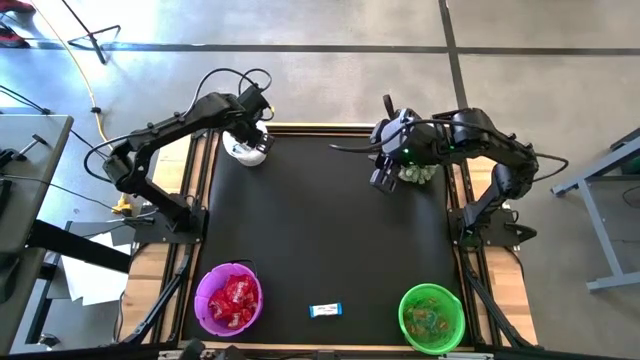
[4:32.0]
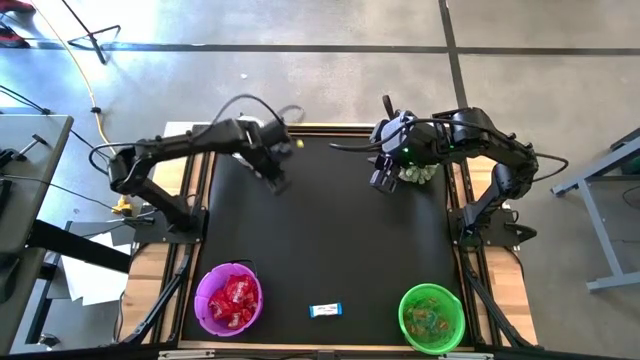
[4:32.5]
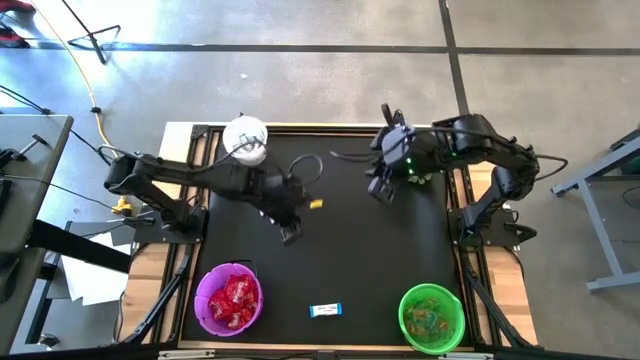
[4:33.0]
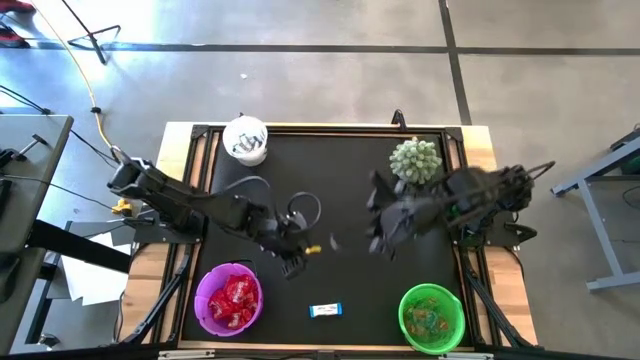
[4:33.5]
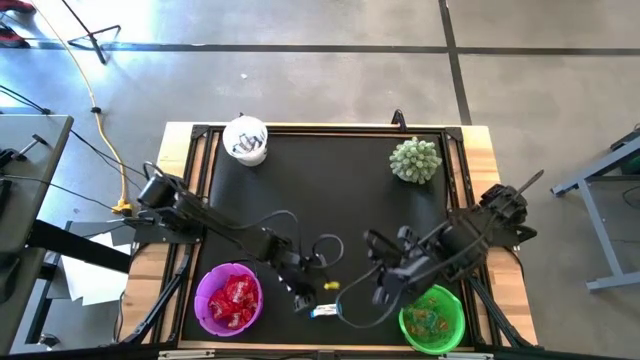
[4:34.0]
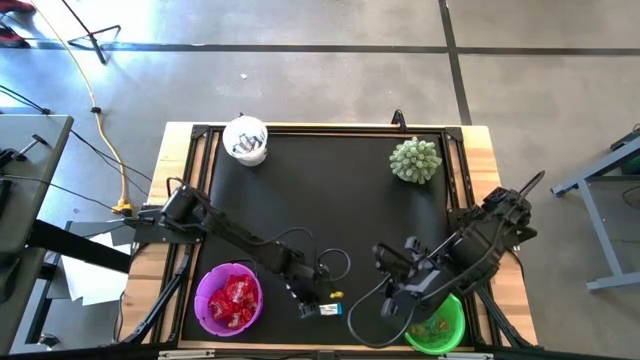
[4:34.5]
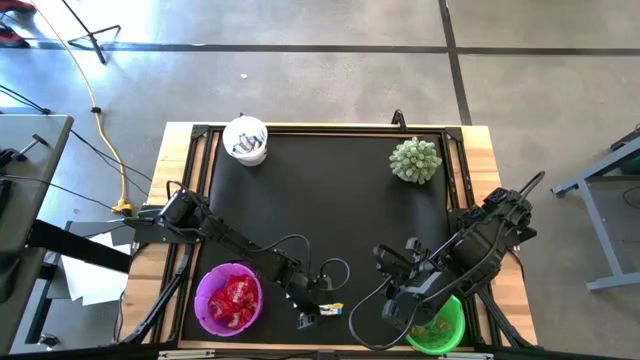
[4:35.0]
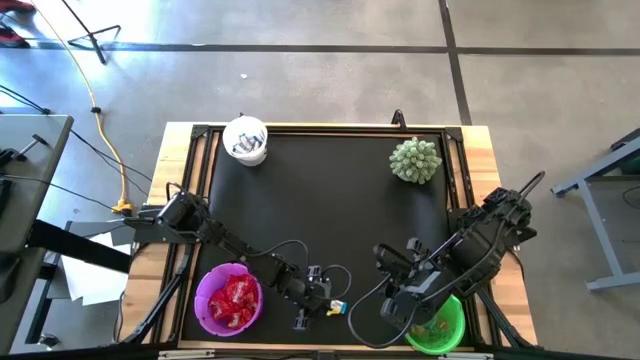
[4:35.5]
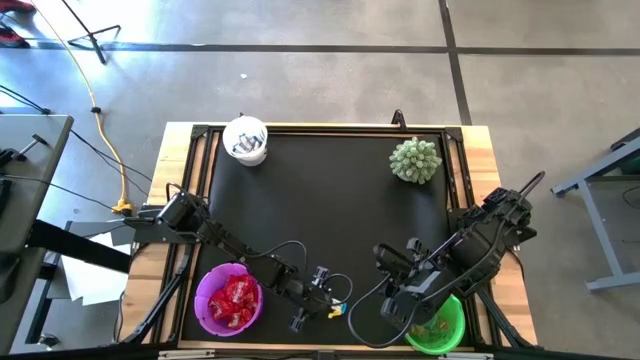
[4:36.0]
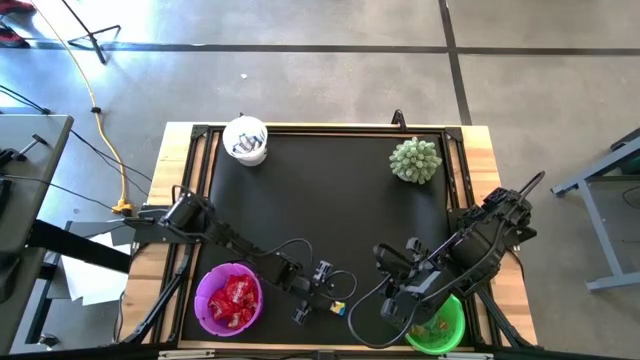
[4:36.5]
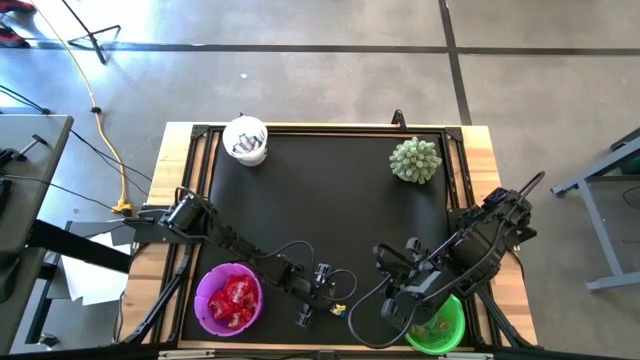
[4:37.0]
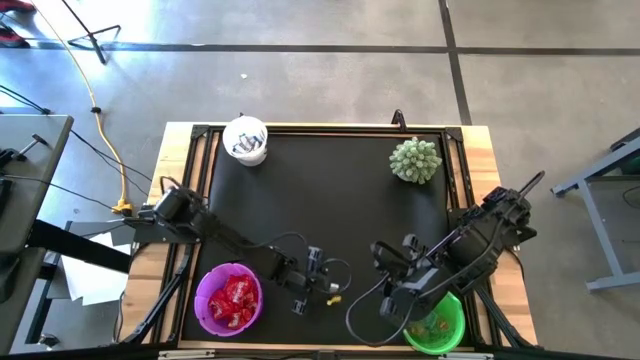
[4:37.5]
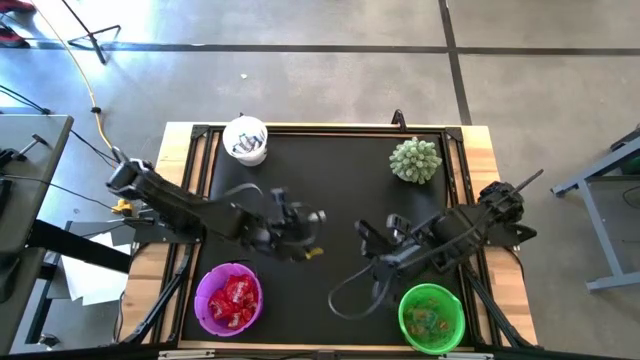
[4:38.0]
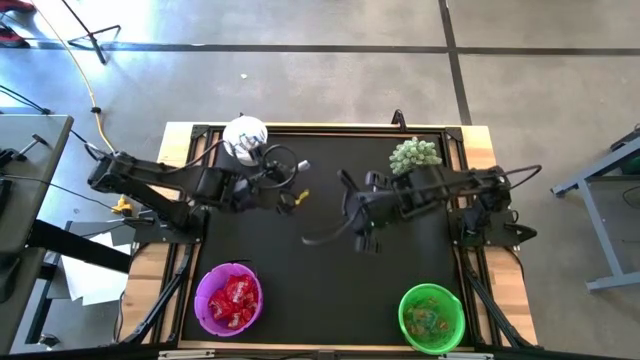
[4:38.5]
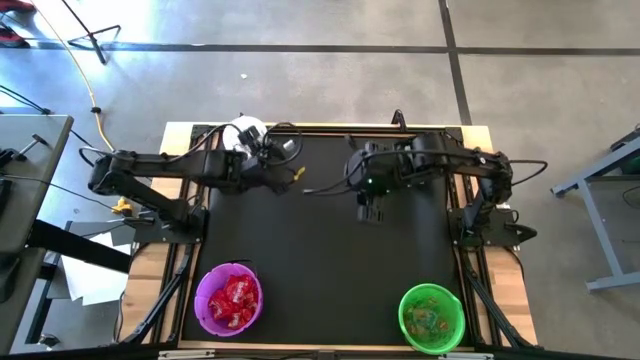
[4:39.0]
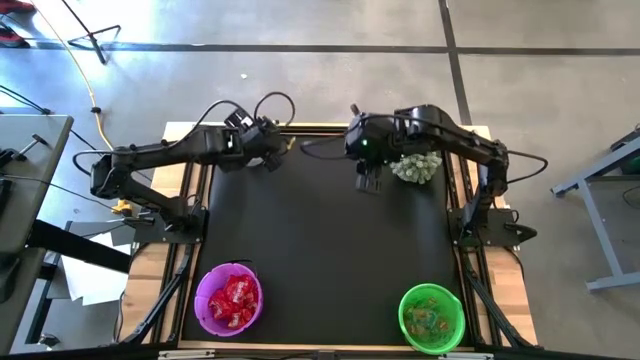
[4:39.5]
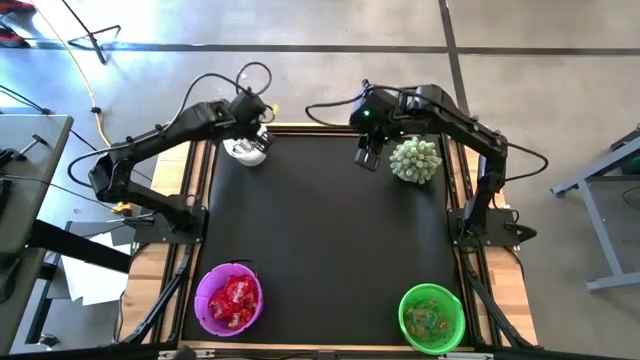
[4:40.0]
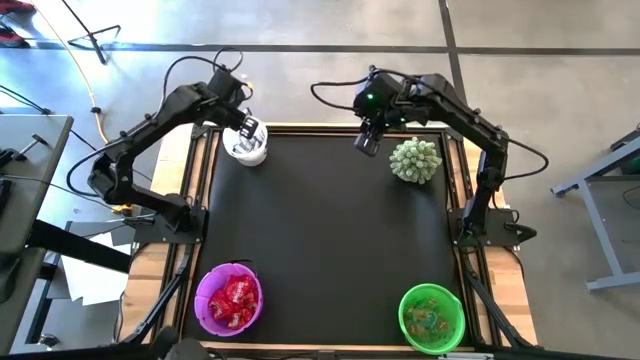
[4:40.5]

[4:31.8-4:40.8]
Task: Sort candy
Put the white chocolate into the white bucket

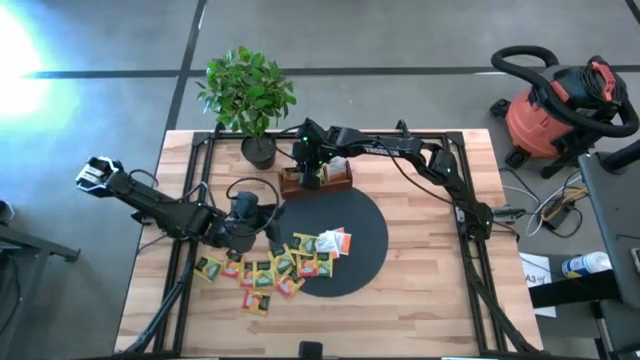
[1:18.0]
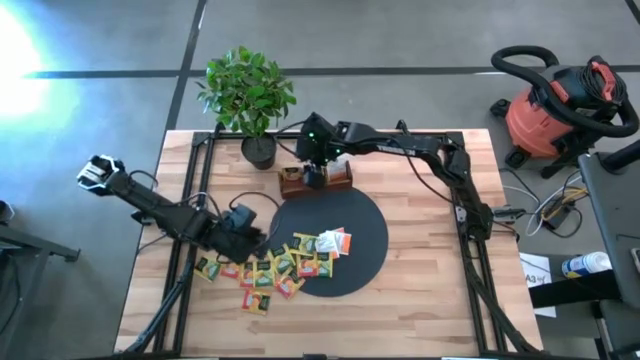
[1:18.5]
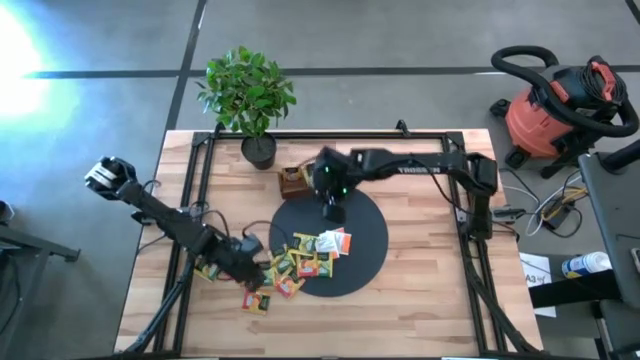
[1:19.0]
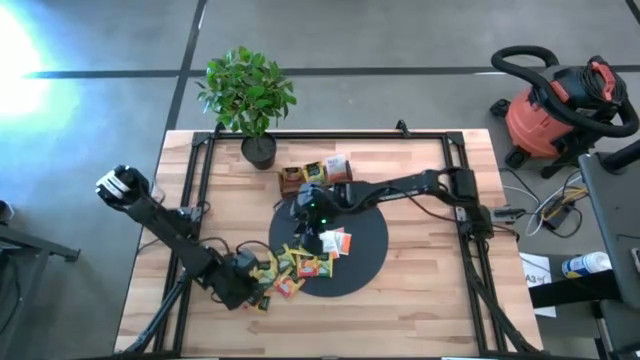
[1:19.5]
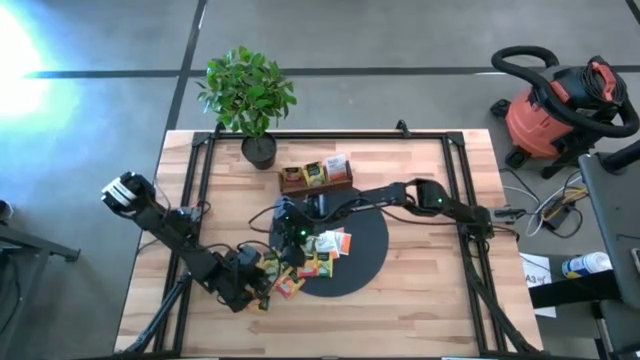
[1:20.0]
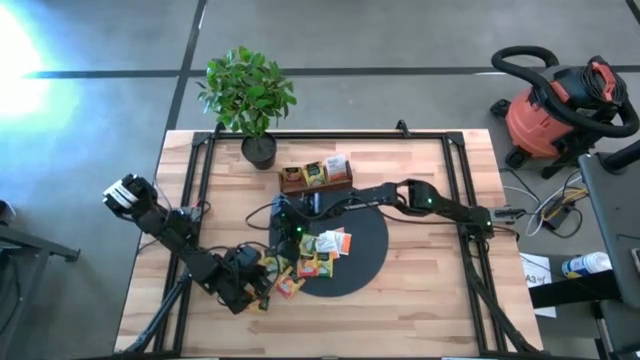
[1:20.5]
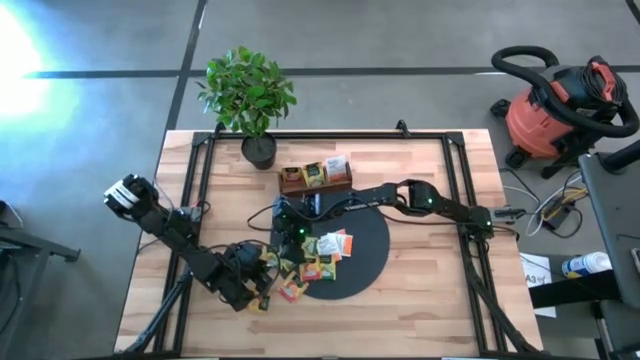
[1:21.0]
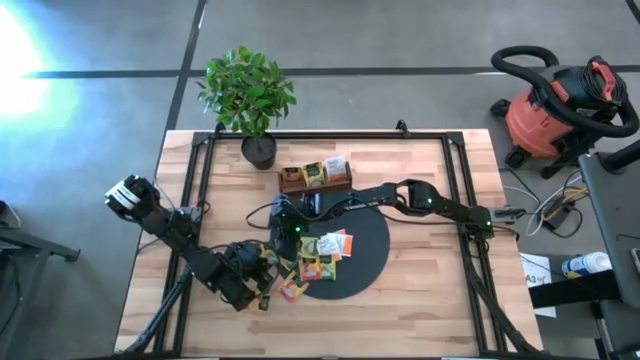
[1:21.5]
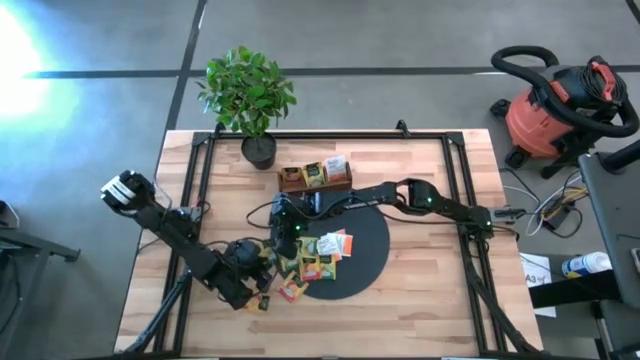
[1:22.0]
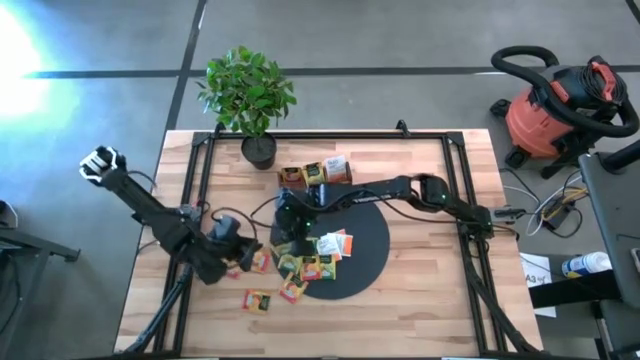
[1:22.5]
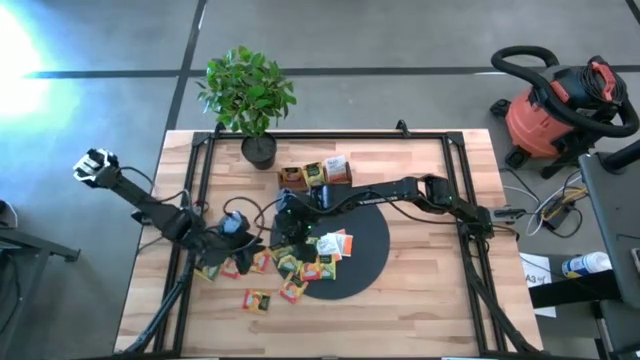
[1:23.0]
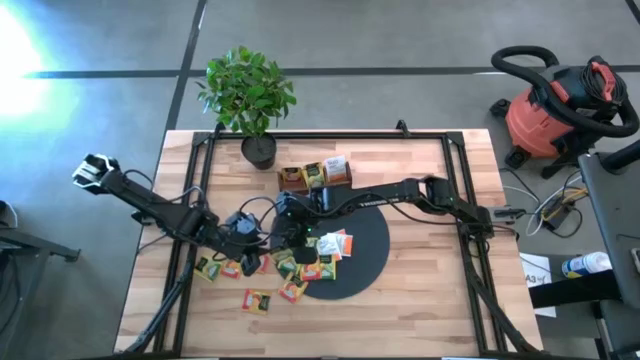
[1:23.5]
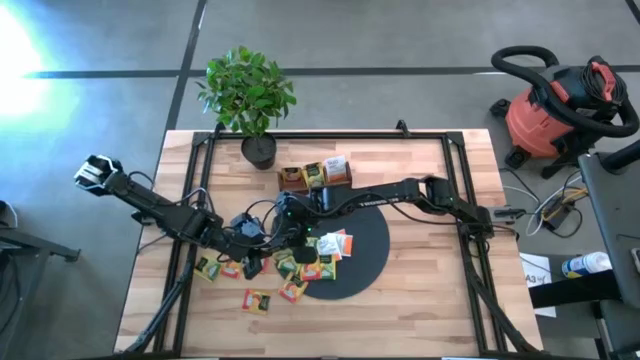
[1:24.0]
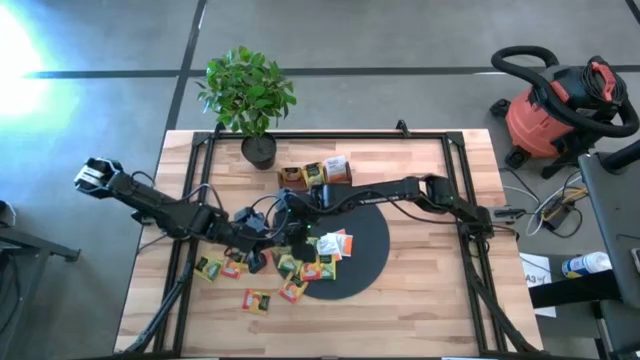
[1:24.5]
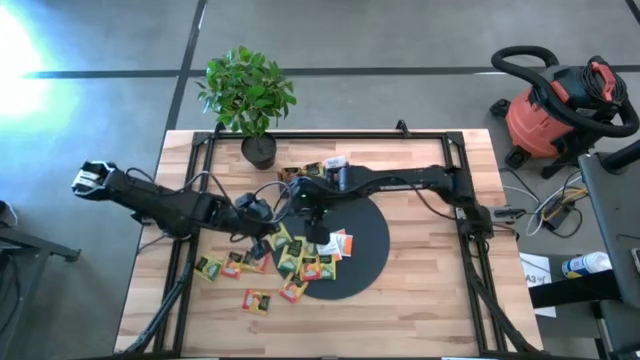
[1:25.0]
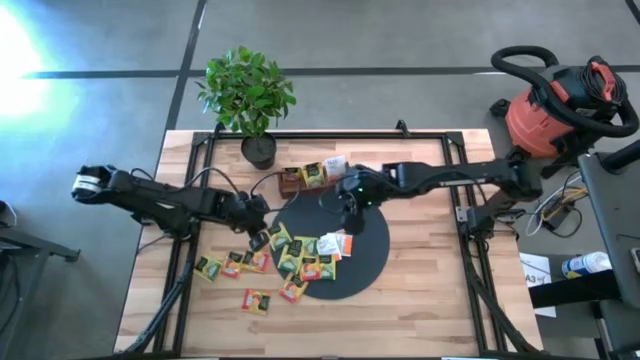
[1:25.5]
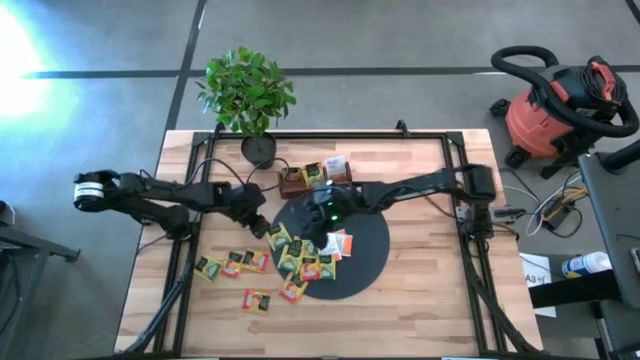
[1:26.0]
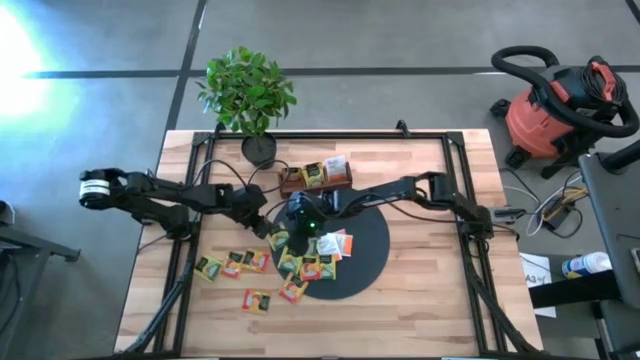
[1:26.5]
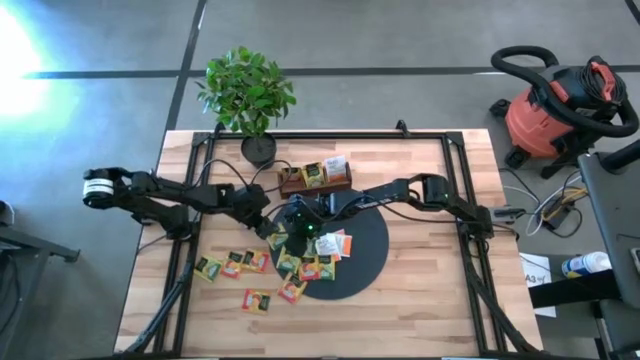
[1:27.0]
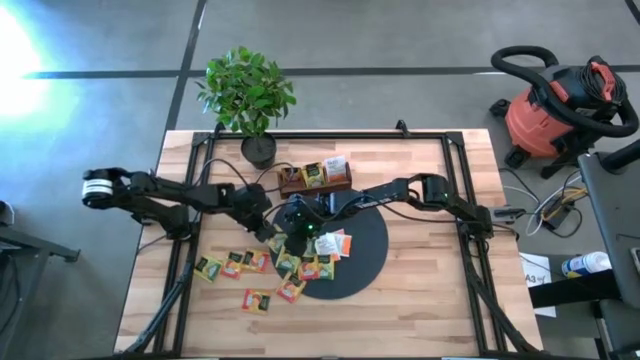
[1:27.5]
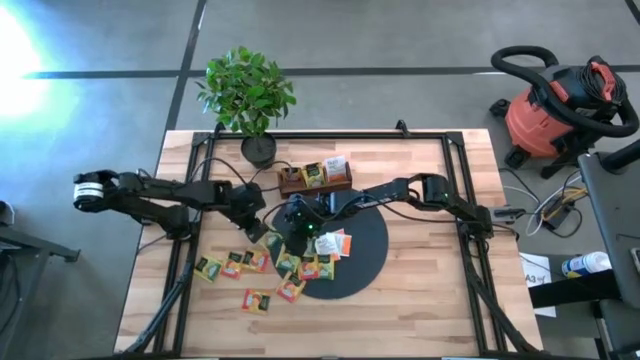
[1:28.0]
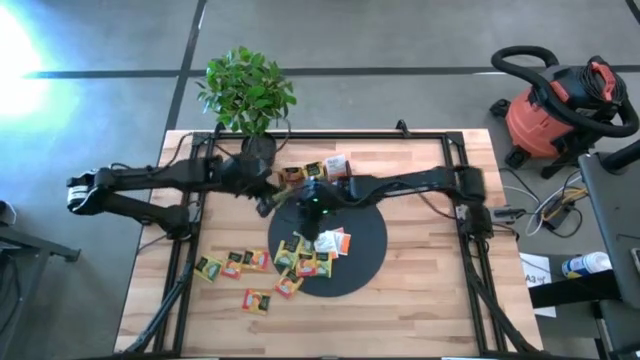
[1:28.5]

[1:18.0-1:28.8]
Task: Pick & Place Tea
Put the yellow tea bag into the middle slot of the wooden organizer
